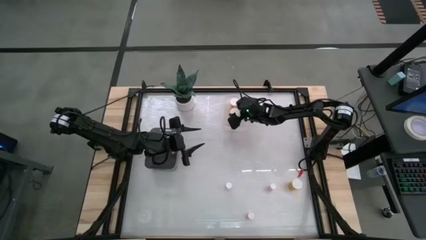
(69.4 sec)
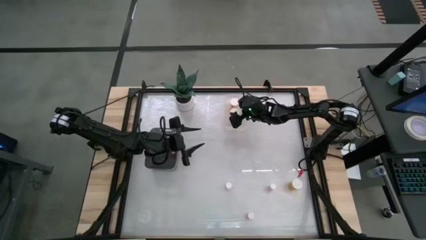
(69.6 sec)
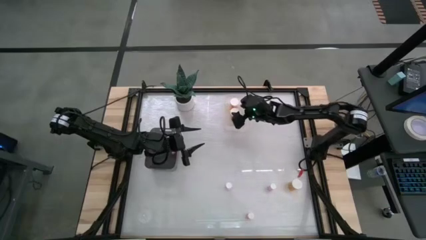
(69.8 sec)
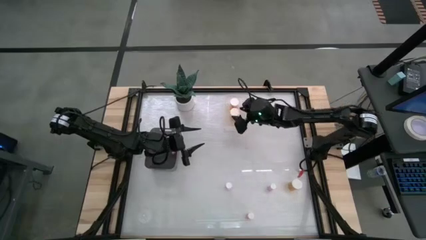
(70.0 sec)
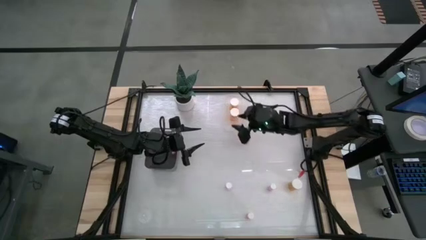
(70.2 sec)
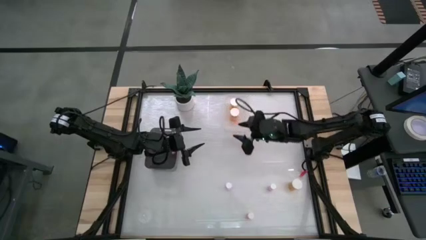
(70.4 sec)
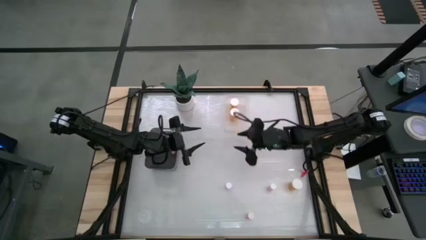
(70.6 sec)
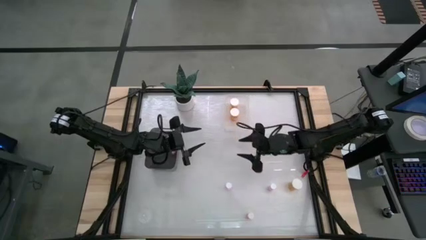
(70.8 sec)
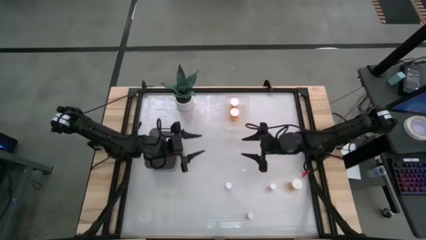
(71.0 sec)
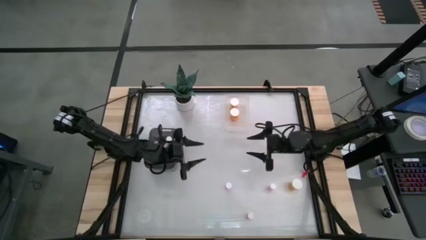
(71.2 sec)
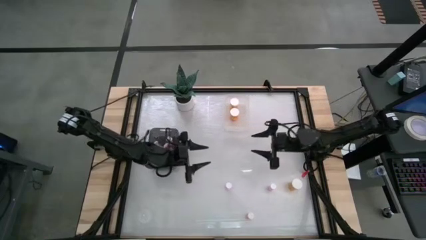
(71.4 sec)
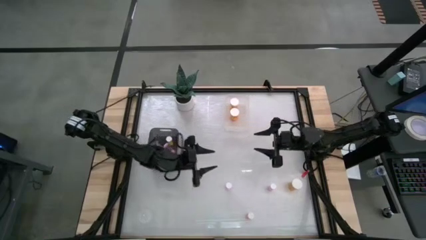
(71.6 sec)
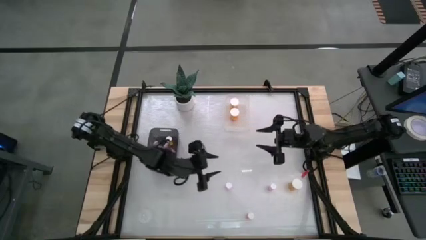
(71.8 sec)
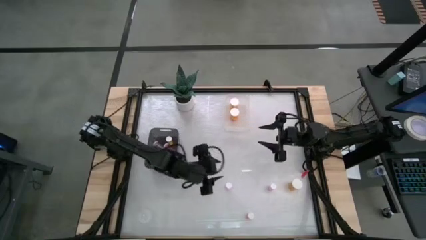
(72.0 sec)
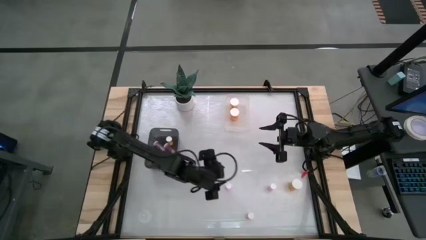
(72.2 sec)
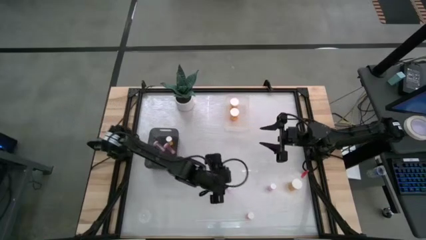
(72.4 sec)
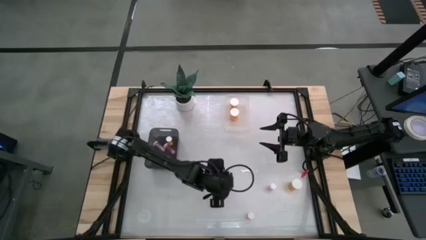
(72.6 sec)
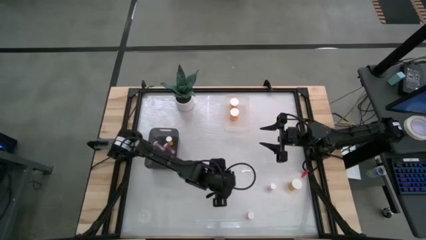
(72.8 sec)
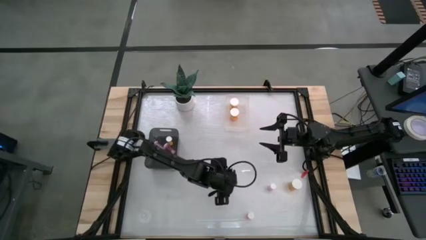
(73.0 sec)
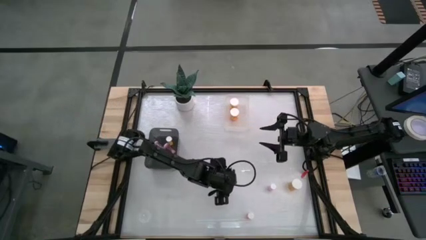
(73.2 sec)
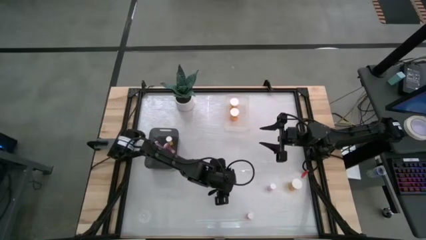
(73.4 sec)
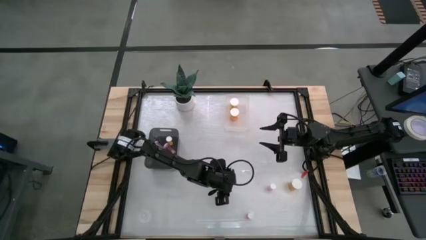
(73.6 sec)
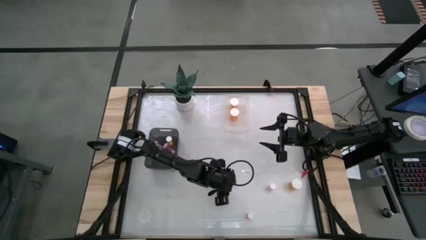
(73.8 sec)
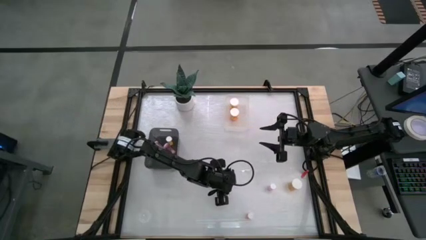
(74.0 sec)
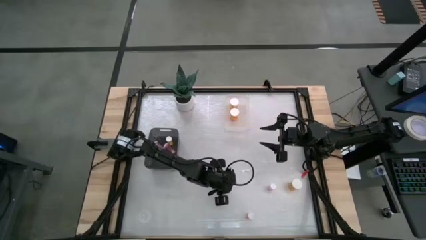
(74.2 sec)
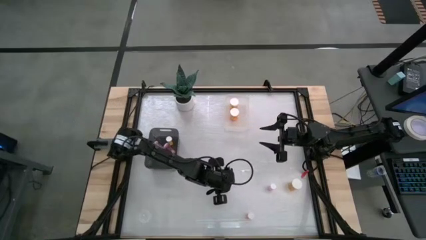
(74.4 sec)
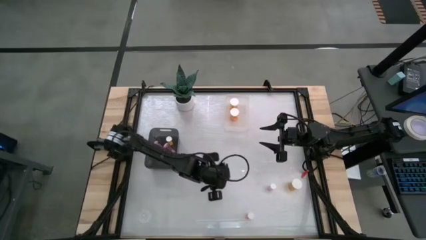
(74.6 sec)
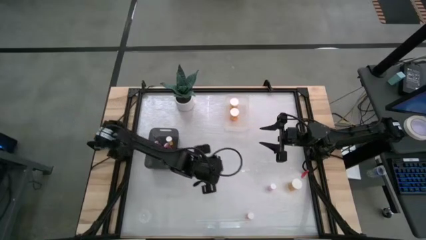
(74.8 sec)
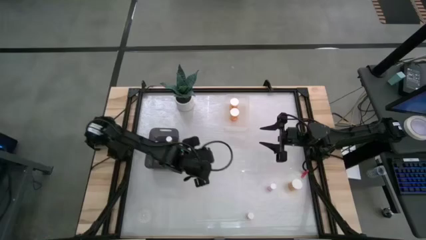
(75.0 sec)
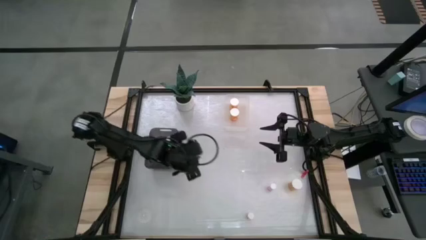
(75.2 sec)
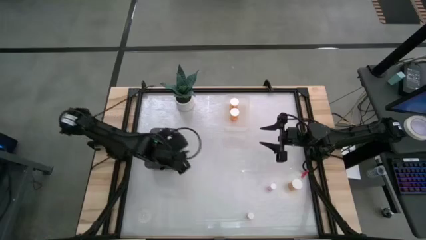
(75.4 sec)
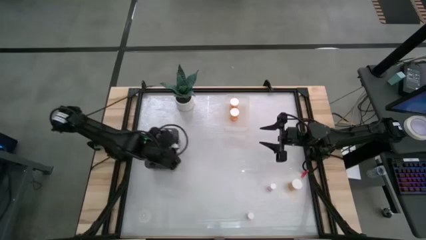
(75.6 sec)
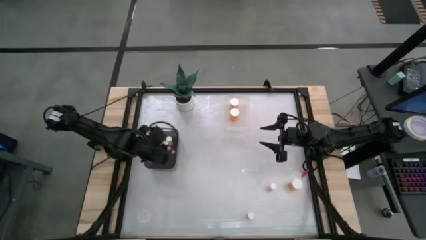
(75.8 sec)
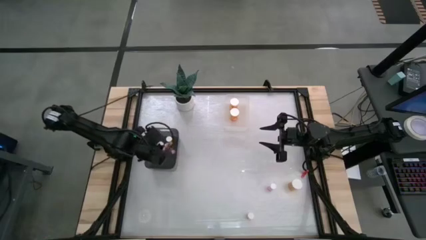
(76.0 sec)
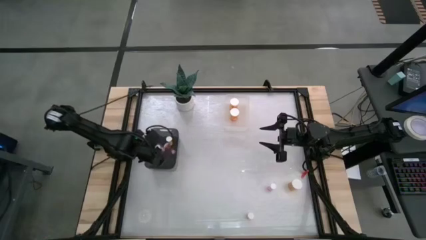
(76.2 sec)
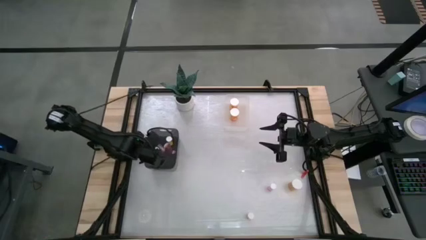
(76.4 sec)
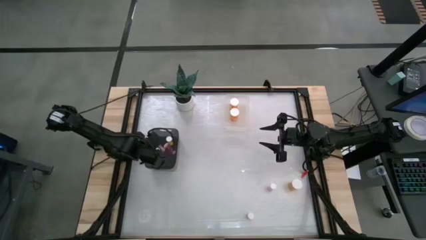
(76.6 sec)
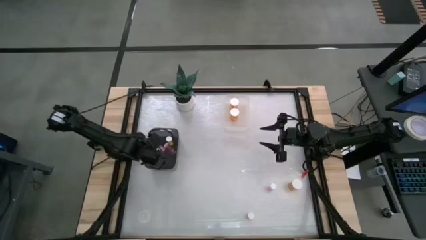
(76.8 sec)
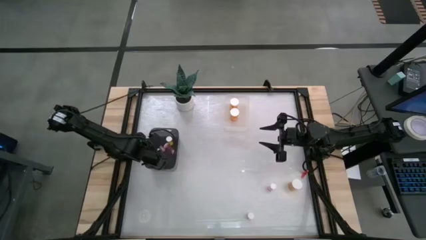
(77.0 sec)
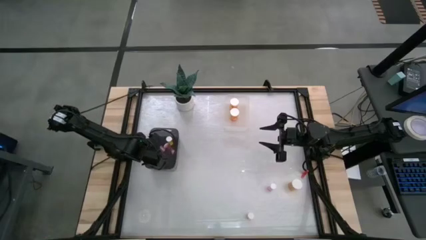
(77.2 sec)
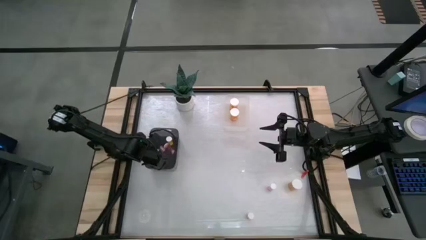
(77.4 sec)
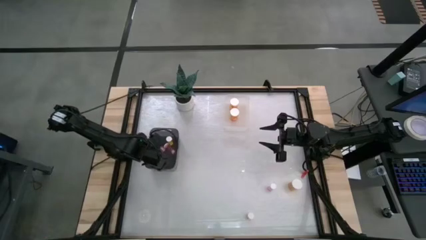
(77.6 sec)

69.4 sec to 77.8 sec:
Task: Pick and place medicine bottles into bin by pill shape (circle, oval)
Put the top left small pink pill bottle into the black bin
